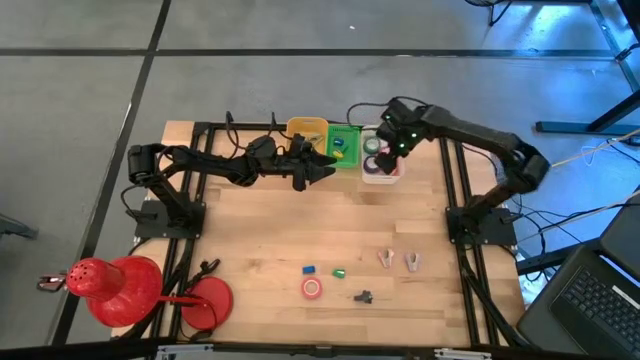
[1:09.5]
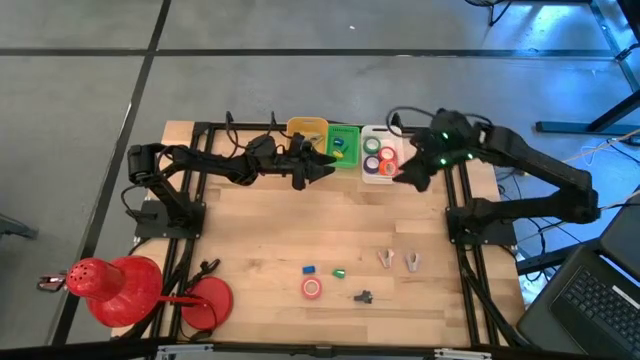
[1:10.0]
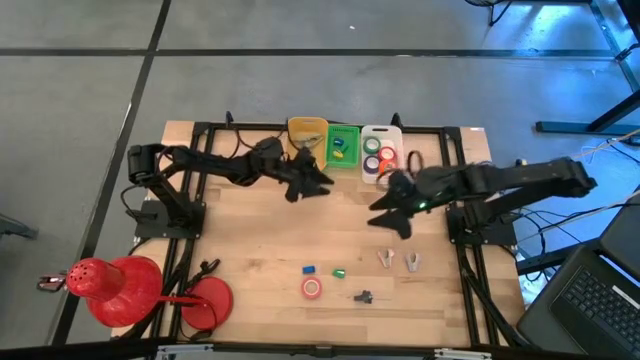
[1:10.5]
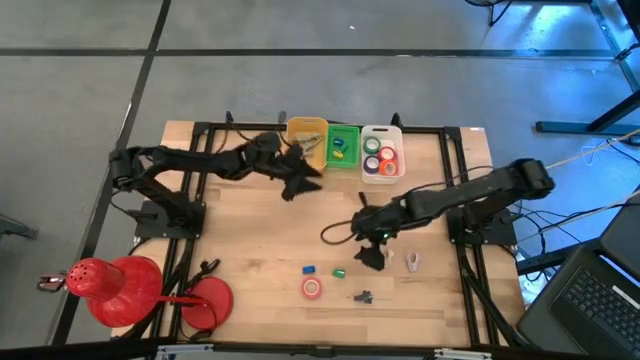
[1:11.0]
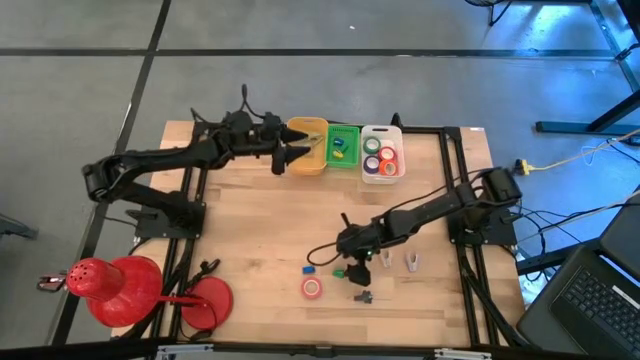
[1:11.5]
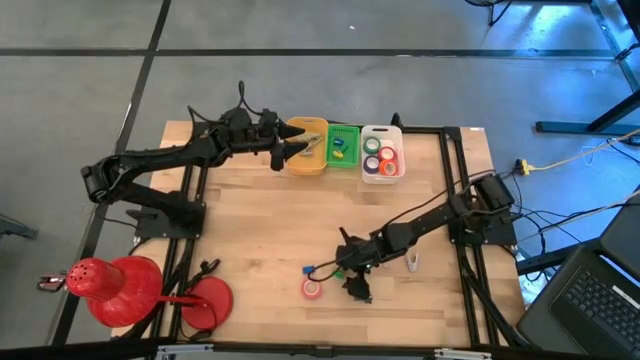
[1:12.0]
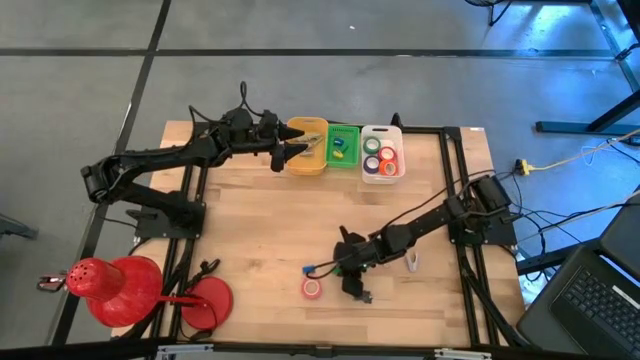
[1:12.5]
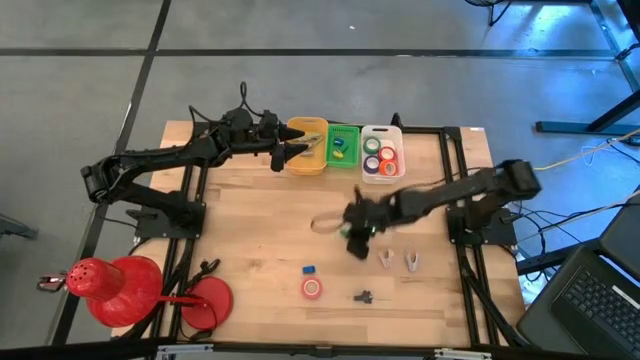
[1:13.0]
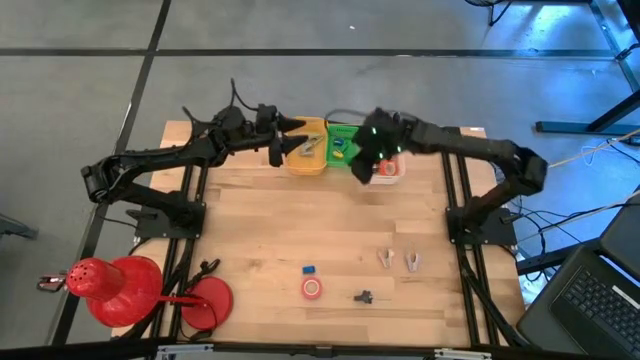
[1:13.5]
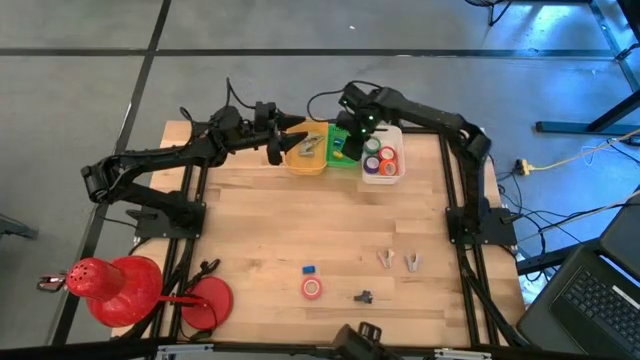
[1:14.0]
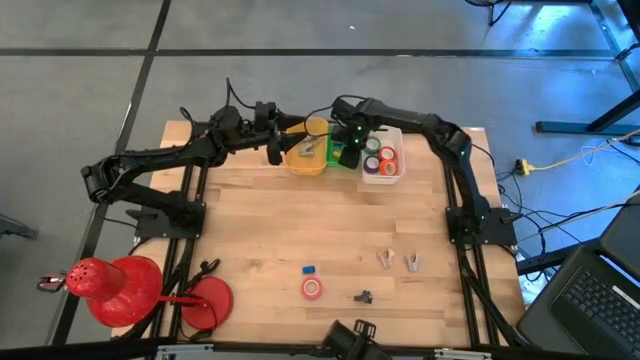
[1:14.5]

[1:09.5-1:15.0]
Task: Pick and place Stapler, Stapler remover, tape
Put the green stapler into the green bin

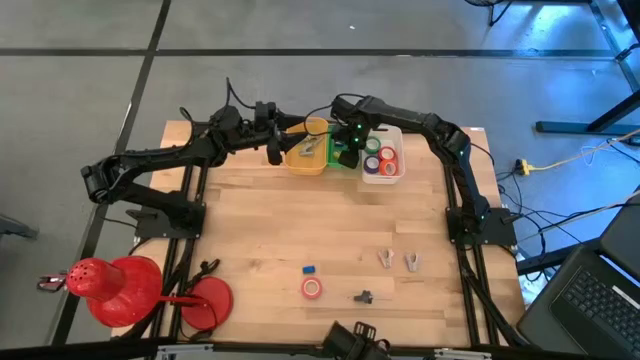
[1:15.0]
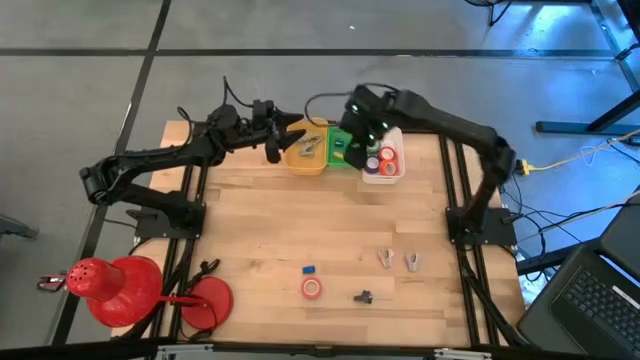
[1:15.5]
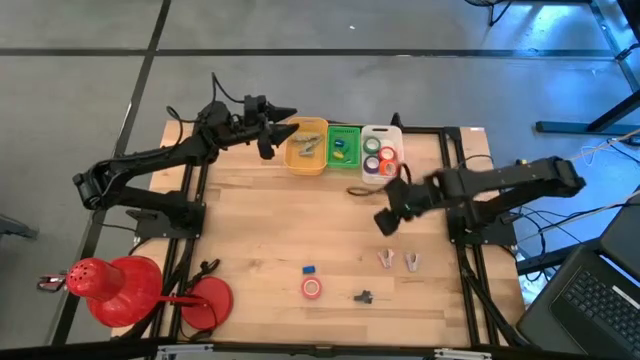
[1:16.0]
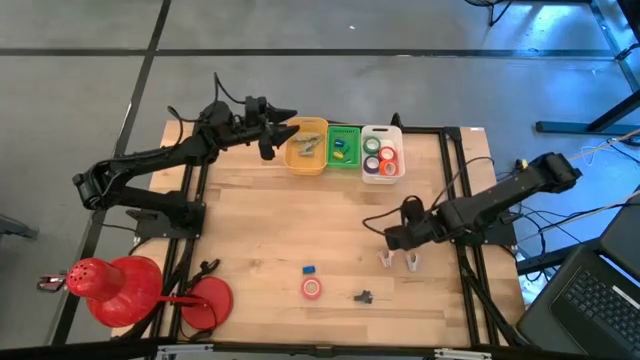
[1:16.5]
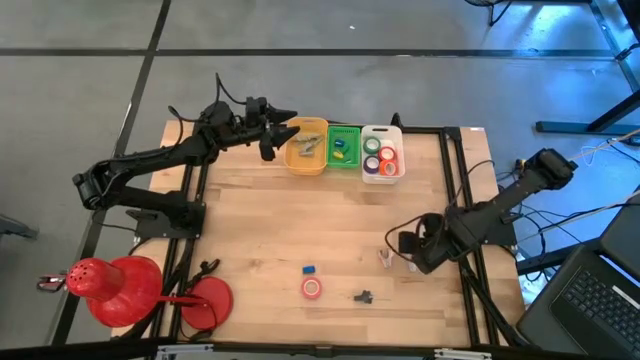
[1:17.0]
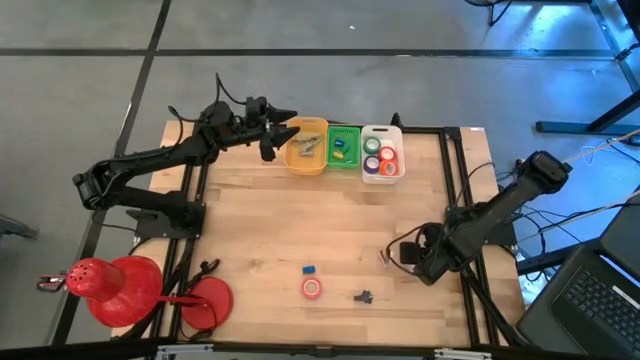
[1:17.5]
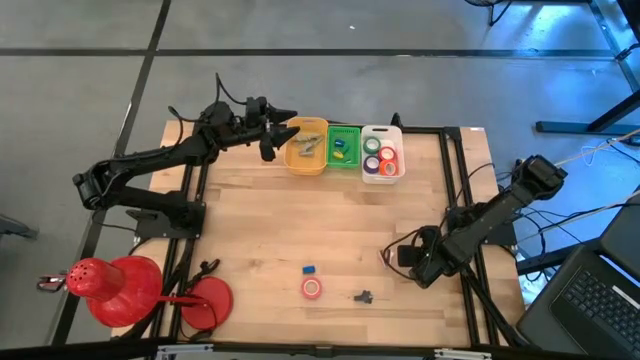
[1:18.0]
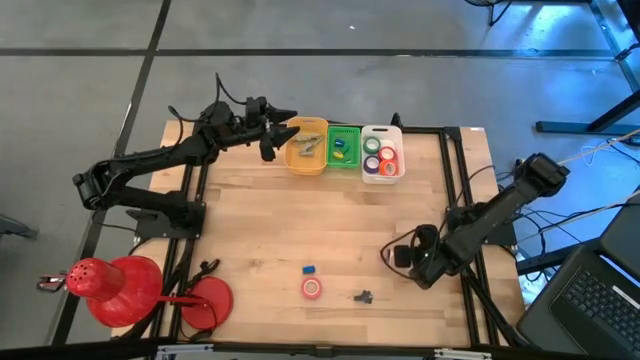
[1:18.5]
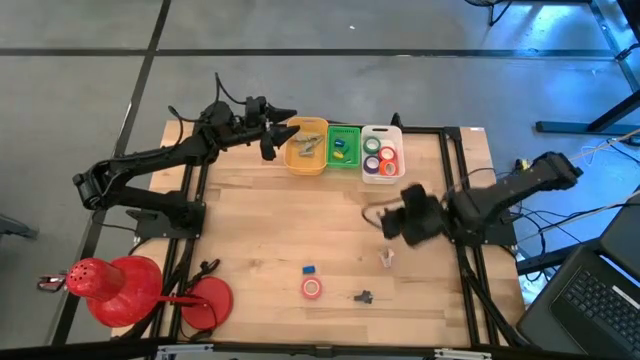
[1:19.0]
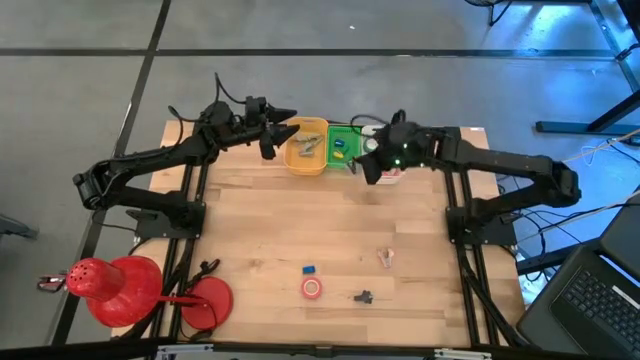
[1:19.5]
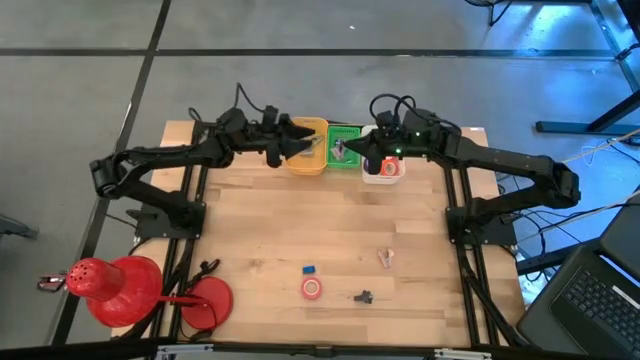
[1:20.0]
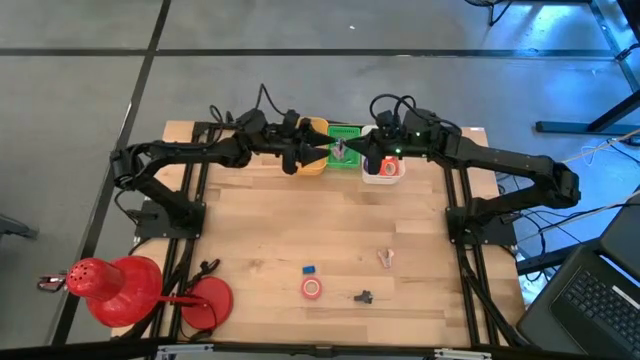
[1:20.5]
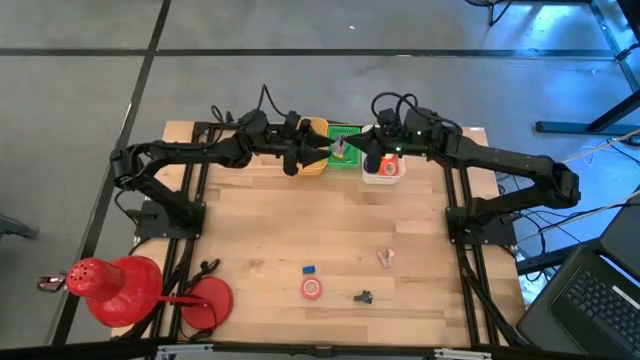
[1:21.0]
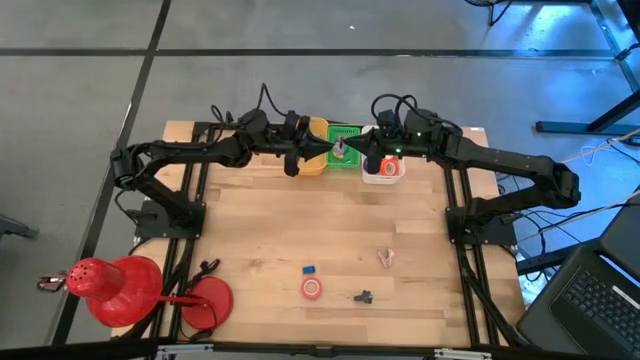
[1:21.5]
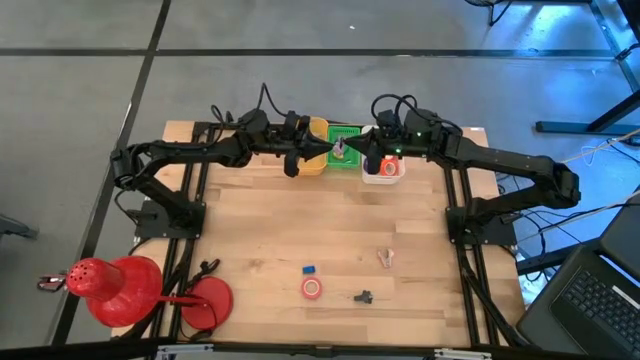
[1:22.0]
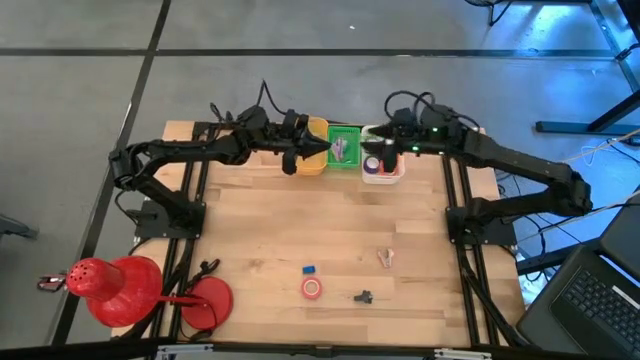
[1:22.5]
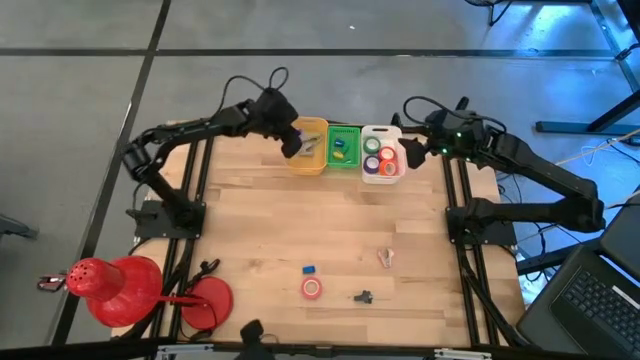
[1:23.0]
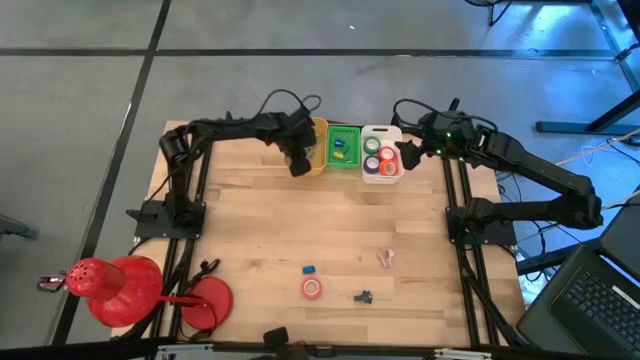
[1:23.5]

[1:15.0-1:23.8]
Put the purple staple remover into the yellow bin

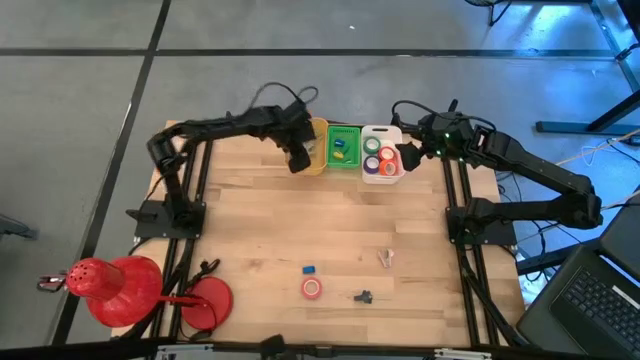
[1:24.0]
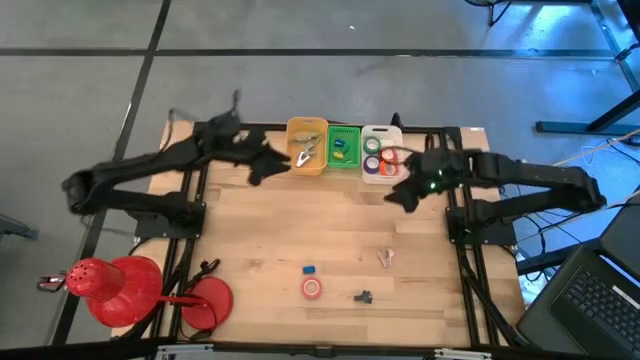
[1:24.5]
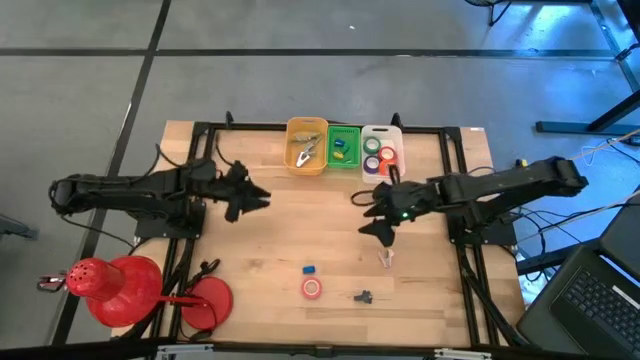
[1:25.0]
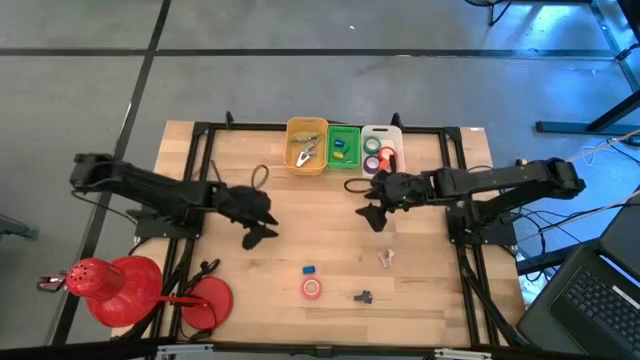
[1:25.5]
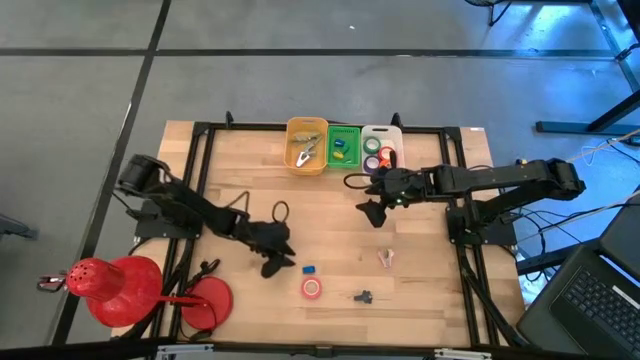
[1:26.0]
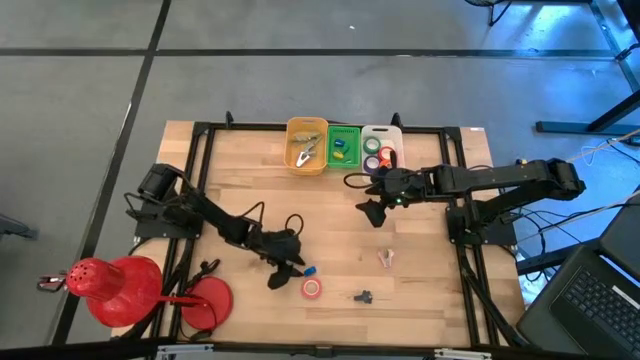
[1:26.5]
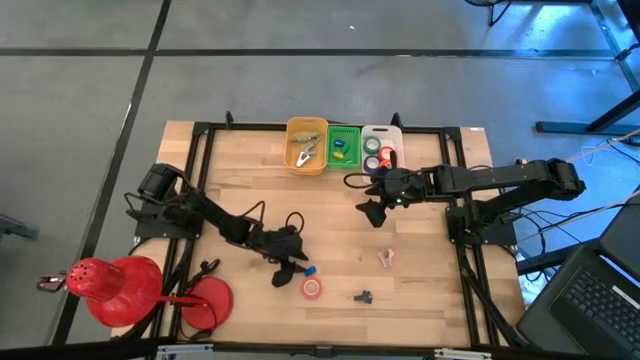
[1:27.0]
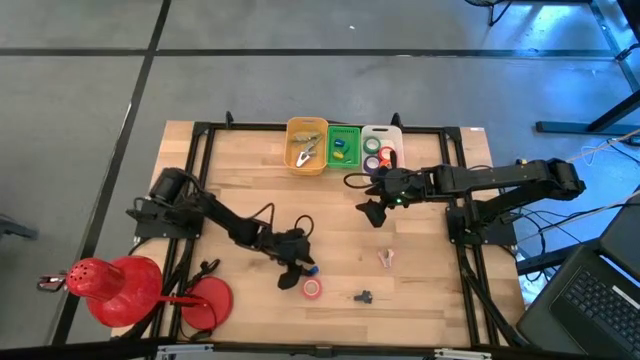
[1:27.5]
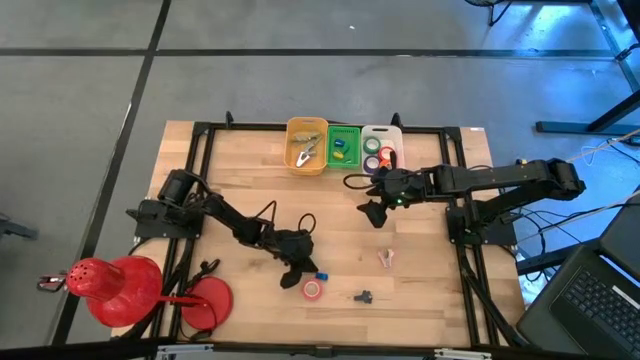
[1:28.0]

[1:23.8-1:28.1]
Put the blue stapler into the green bin

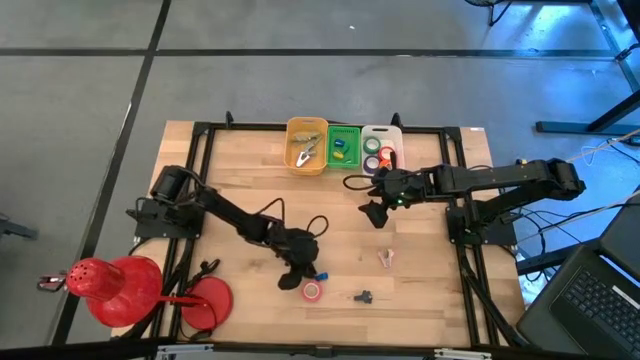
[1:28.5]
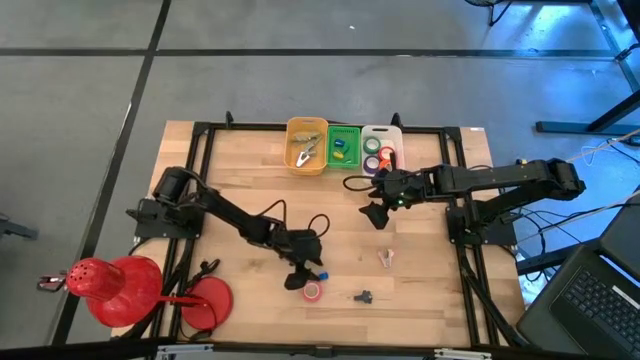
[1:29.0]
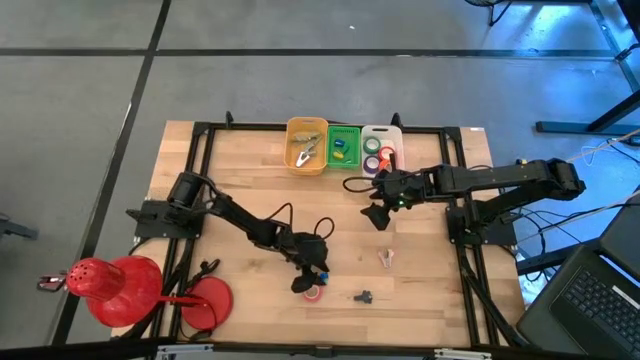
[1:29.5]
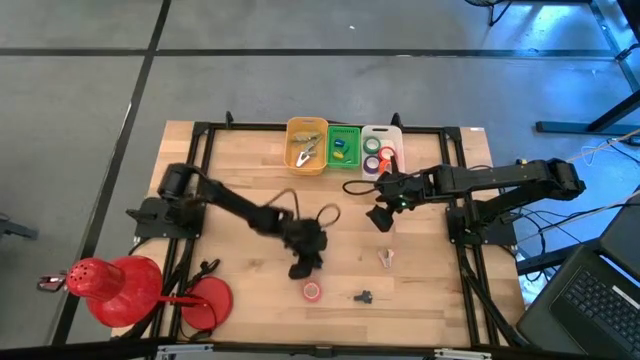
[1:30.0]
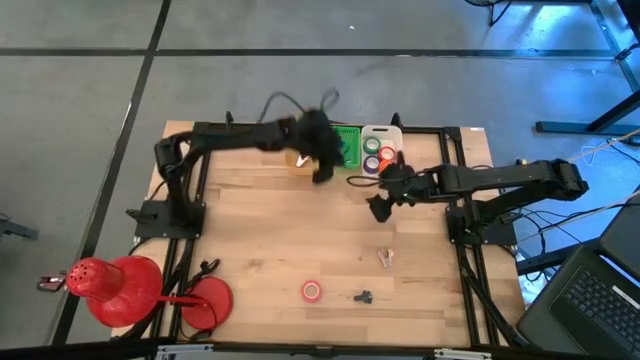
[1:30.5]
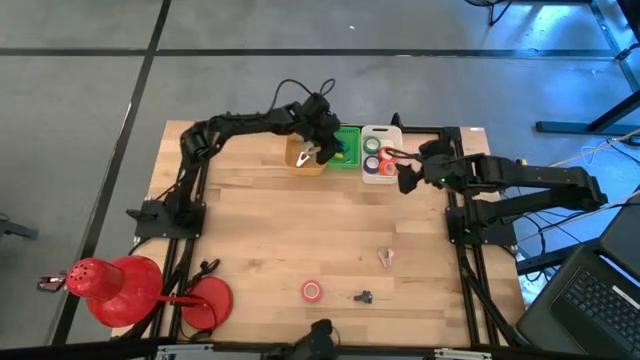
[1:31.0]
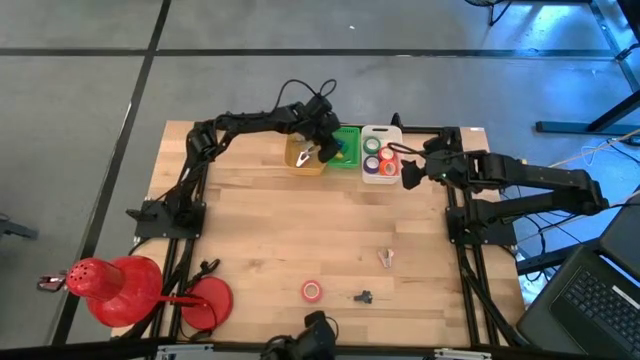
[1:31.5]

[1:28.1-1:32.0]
Put the blue stapler into the green bin
